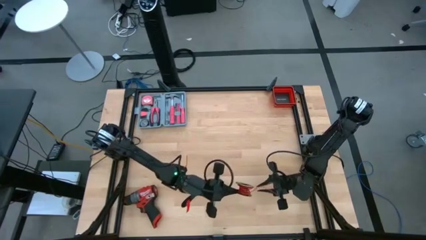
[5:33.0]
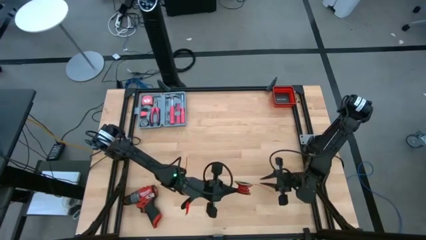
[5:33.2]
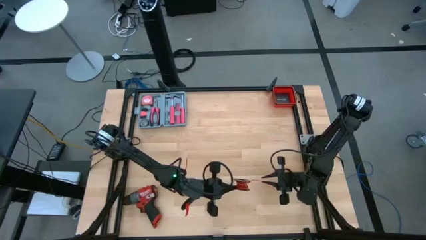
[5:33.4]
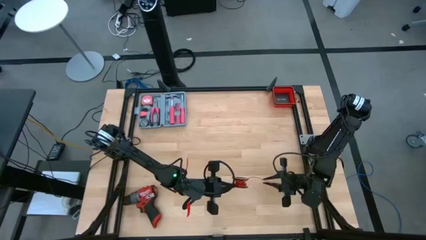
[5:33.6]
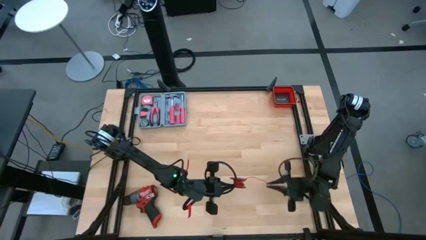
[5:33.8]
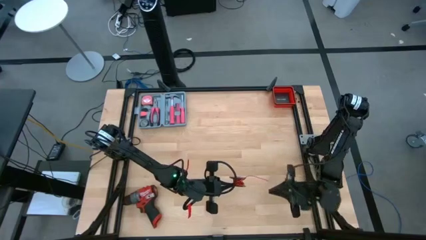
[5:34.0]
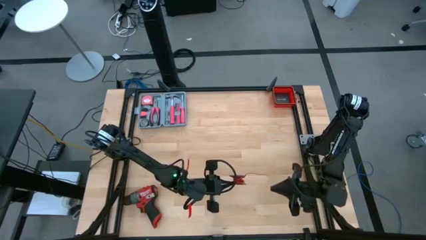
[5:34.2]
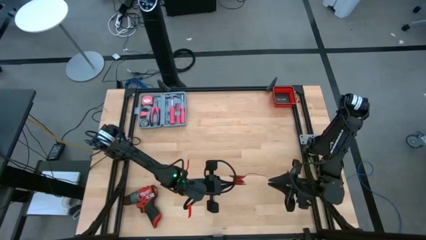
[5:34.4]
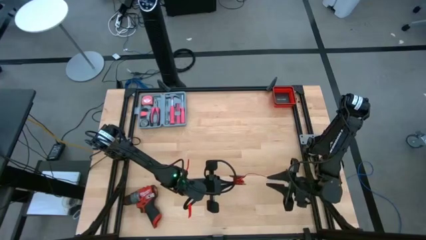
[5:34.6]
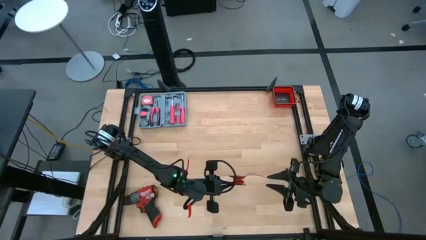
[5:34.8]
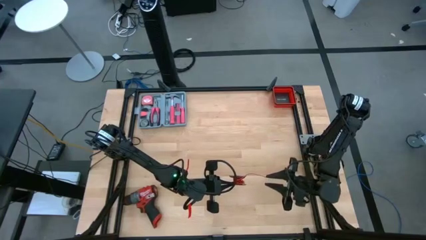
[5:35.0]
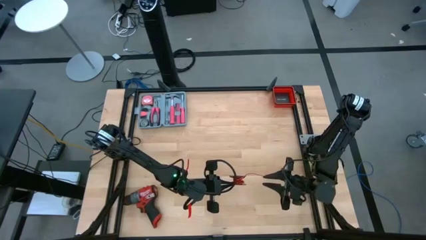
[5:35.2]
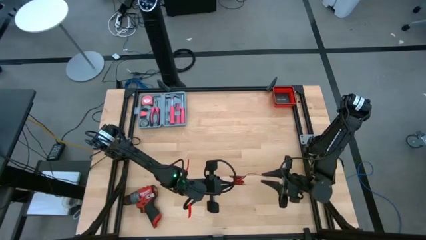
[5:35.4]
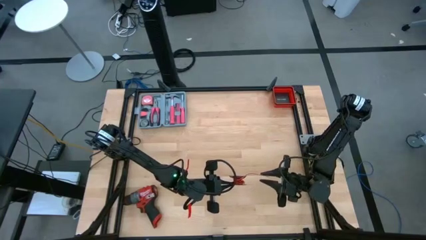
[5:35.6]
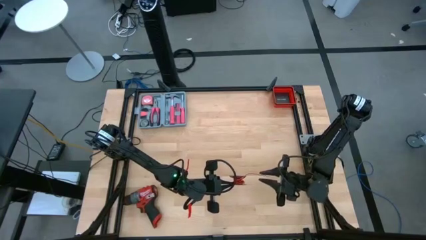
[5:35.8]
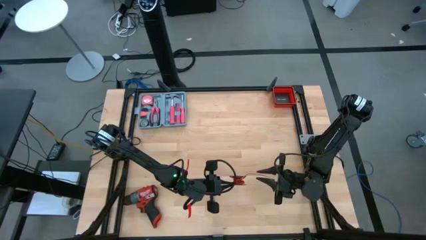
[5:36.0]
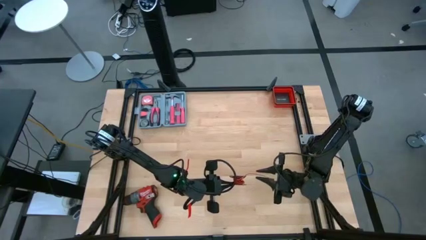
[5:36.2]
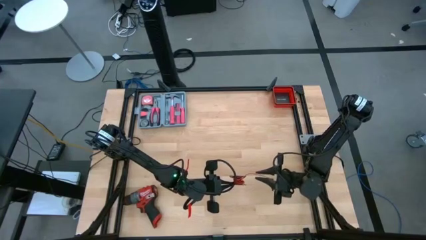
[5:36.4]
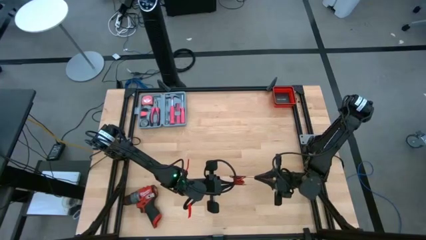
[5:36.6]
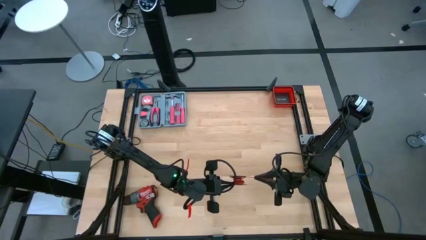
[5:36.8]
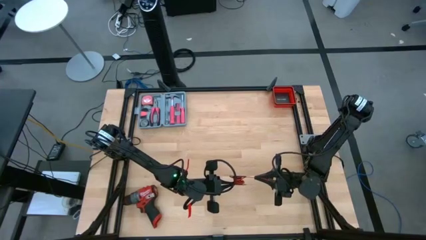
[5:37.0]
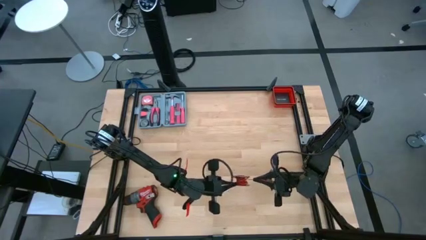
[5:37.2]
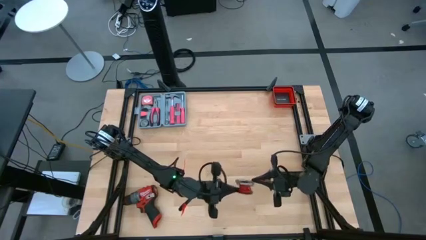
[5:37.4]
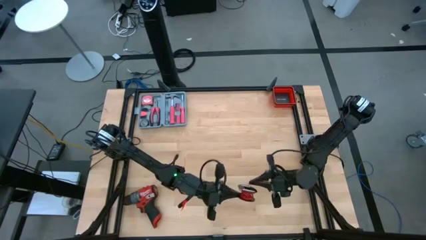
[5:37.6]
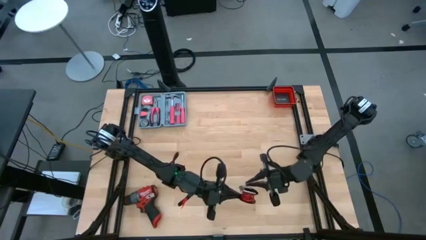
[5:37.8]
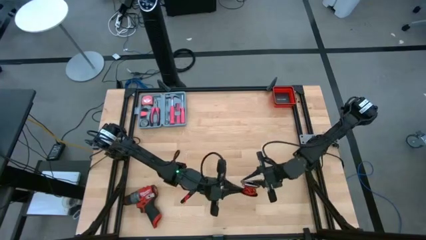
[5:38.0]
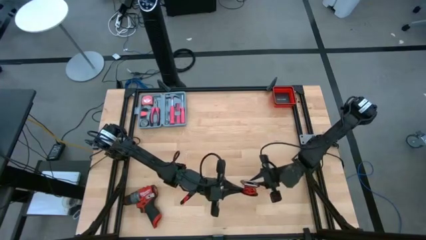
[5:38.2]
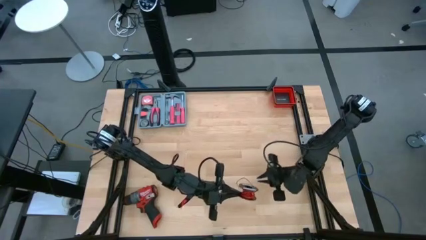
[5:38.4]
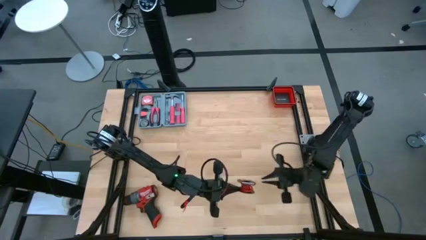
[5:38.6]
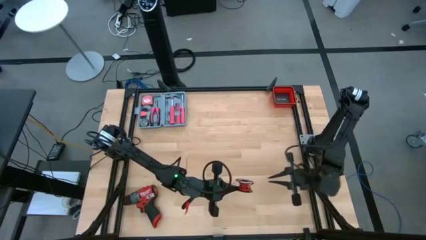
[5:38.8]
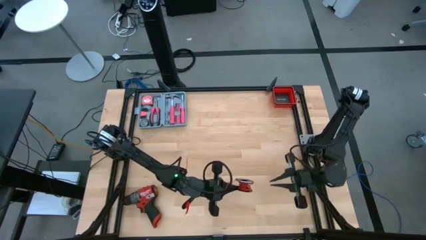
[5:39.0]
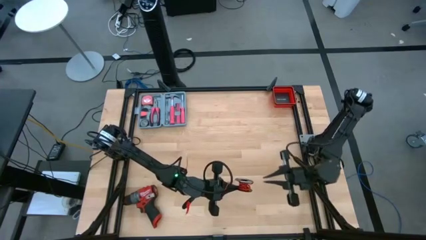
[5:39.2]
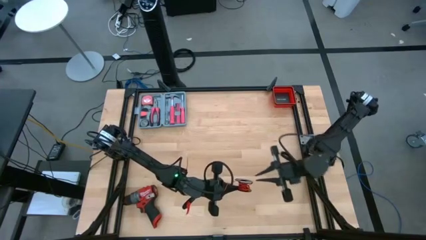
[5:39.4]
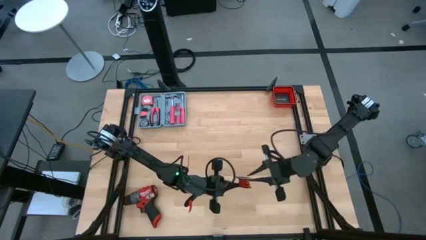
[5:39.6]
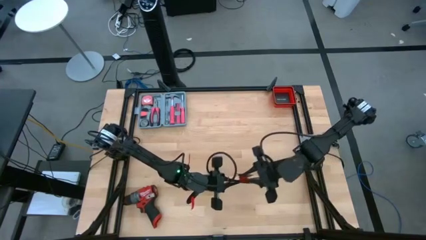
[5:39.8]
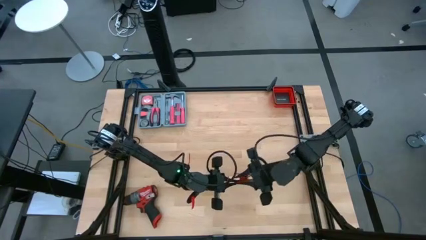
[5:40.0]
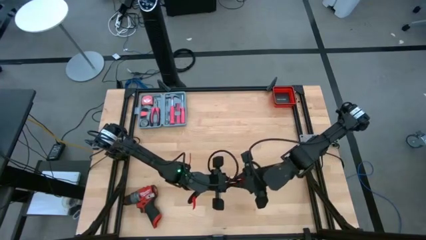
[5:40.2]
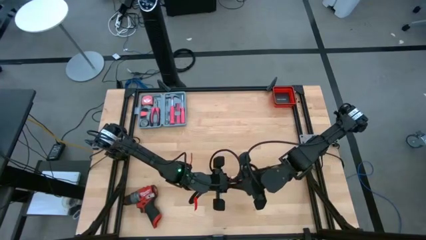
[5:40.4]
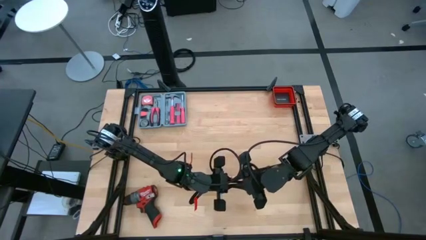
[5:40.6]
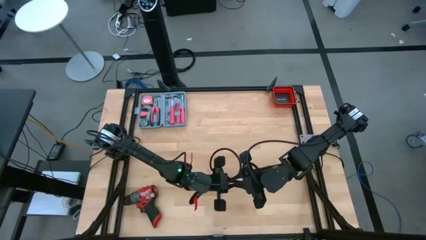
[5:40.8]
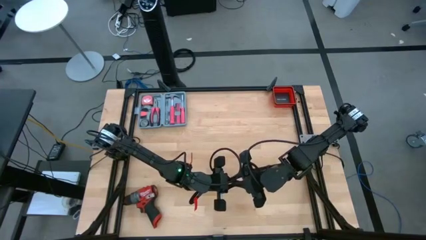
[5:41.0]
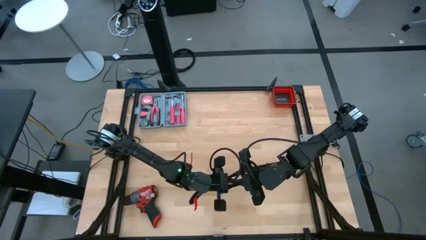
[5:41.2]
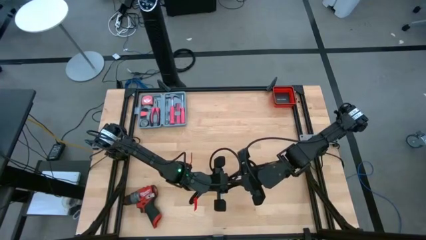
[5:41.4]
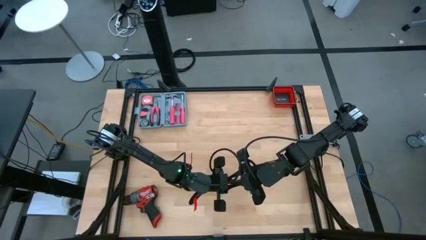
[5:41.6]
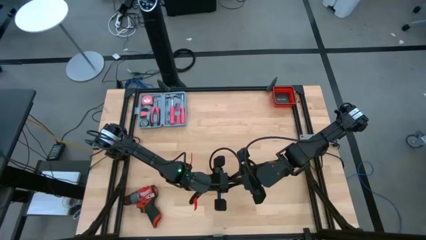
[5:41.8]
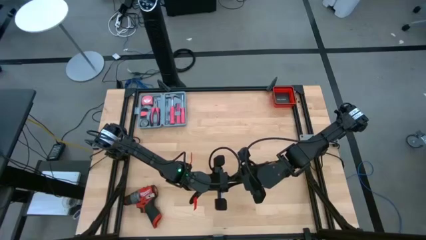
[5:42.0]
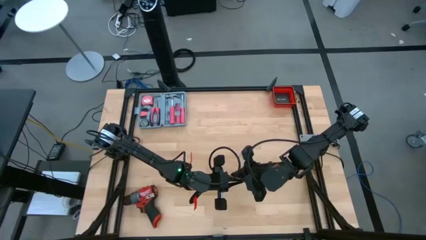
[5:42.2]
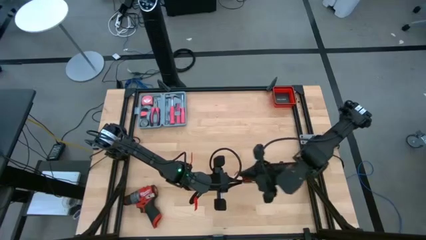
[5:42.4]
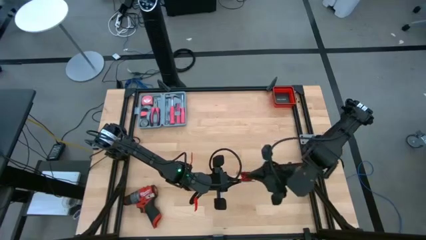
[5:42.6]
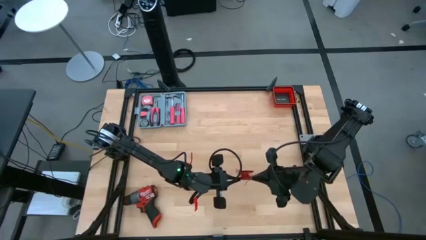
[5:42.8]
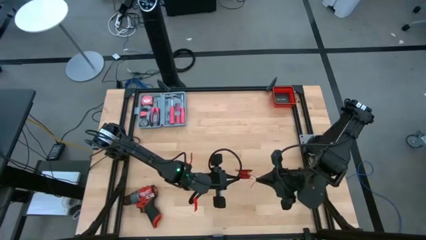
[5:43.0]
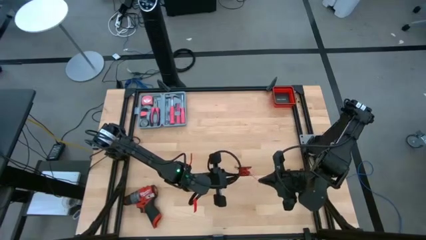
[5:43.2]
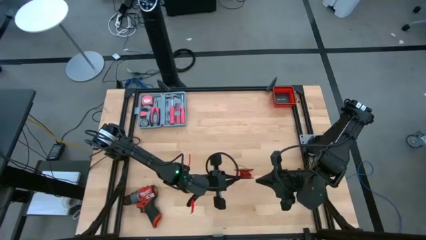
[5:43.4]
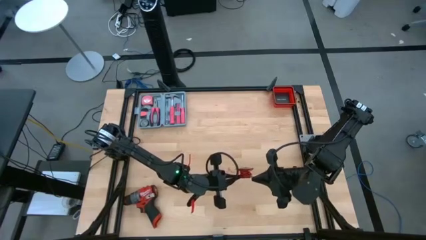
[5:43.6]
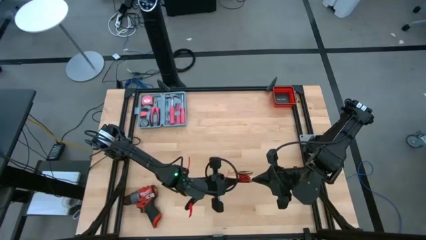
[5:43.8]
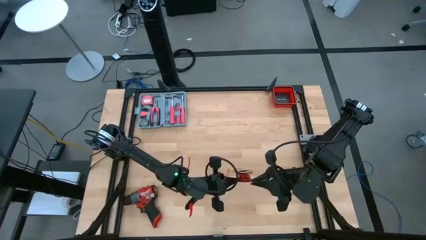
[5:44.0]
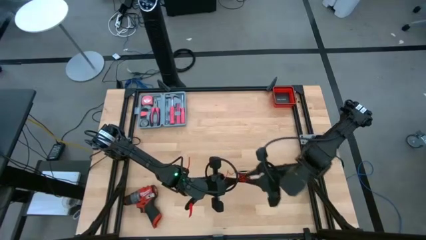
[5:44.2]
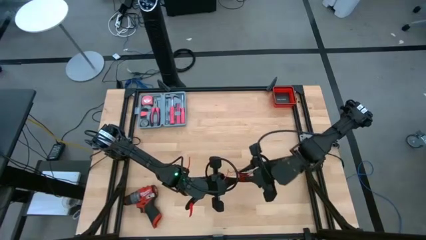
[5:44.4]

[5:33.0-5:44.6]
Task: Coil cords
Coil the red wire on the black spool

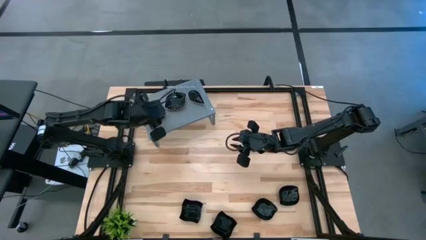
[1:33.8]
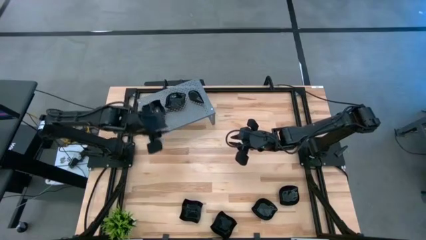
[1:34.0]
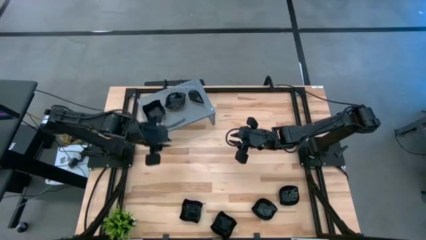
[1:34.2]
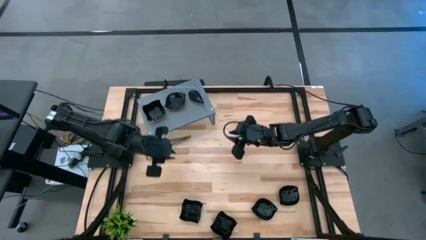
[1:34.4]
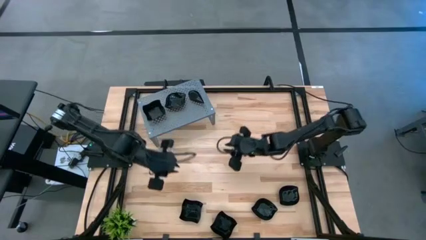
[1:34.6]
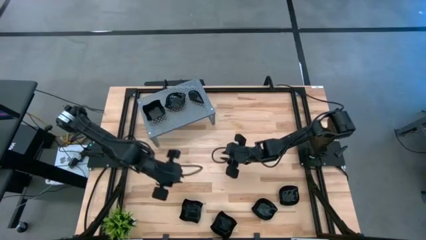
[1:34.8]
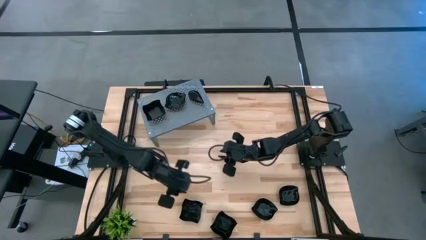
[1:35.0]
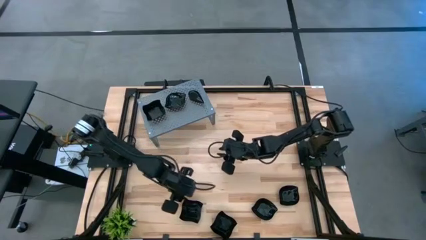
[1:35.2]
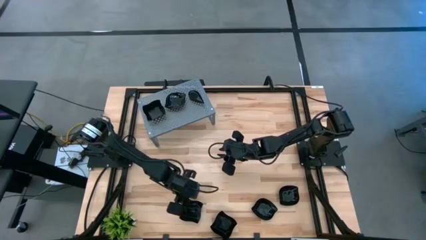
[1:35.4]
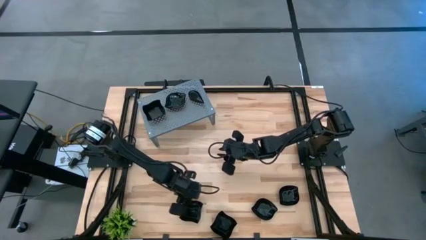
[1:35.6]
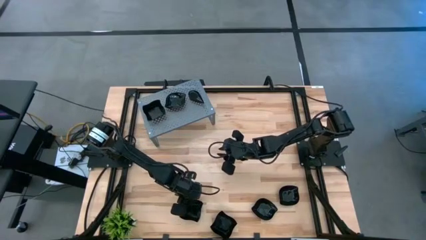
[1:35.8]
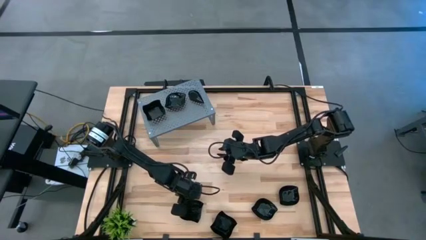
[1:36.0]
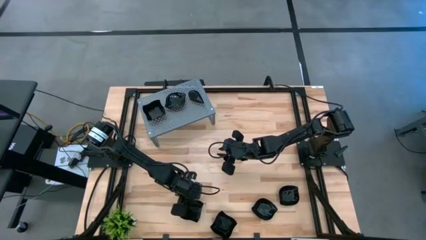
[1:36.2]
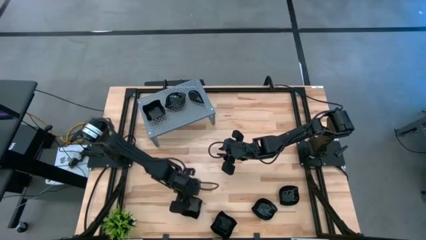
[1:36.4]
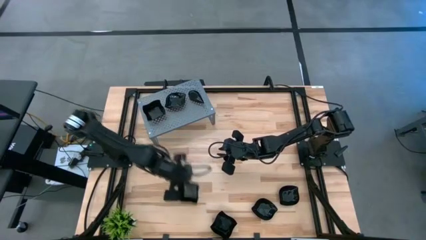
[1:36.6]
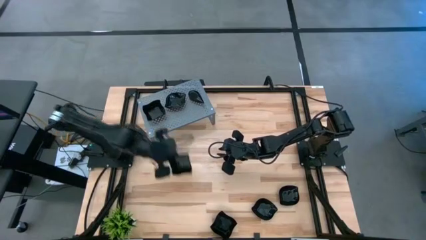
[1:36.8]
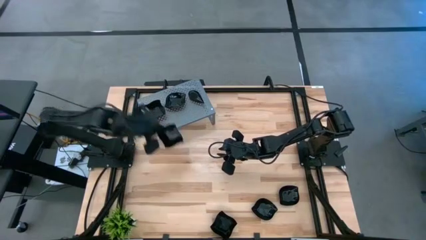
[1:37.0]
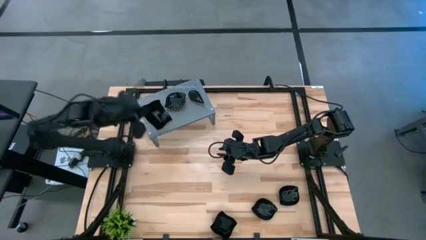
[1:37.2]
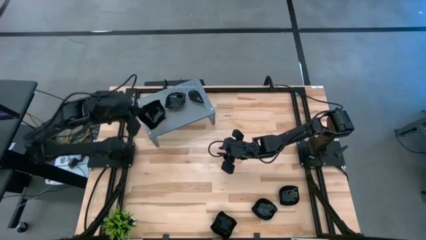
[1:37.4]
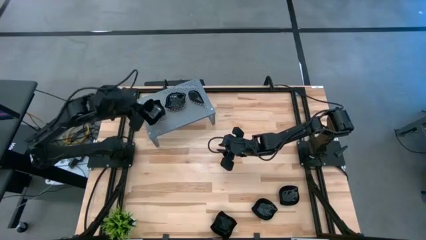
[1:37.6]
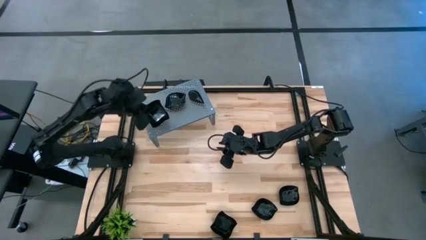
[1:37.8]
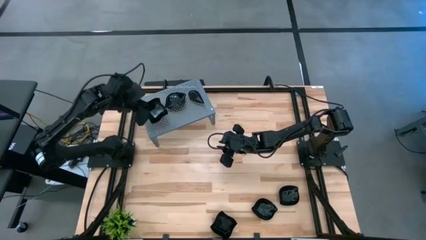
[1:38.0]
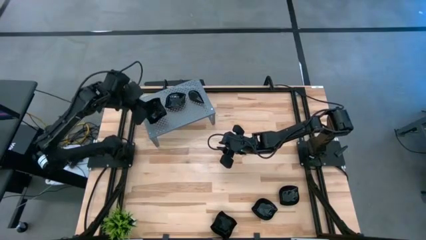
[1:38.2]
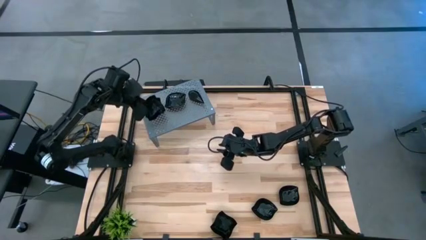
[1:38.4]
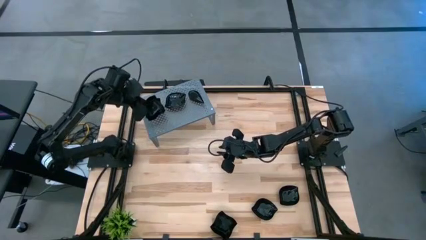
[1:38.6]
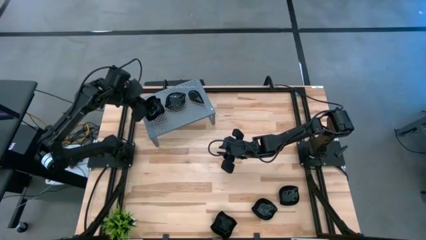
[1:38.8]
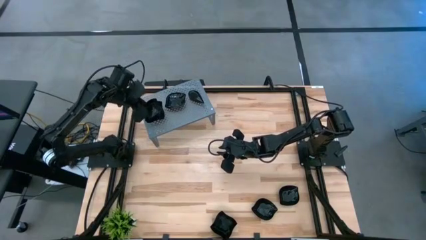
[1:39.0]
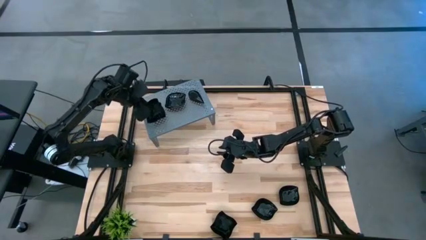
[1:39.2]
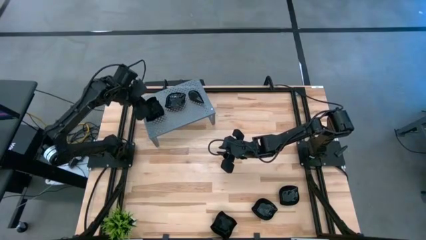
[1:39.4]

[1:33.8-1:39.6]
Task: Pick & Place Mini shaped plates
Stack the black distorted square plate on top of the black distorted square plate on the shelf
